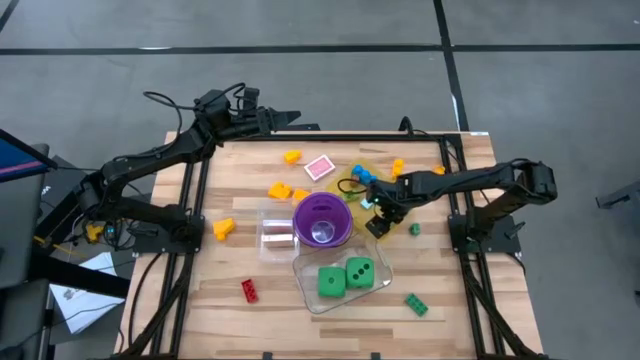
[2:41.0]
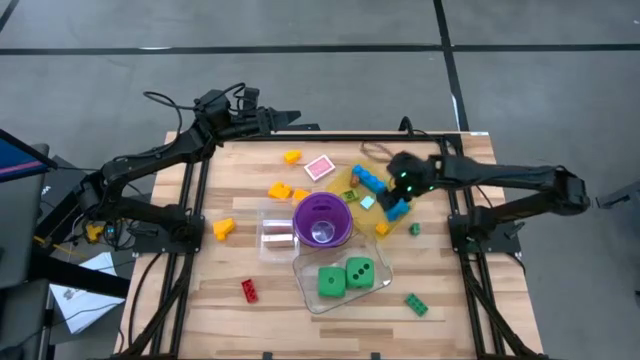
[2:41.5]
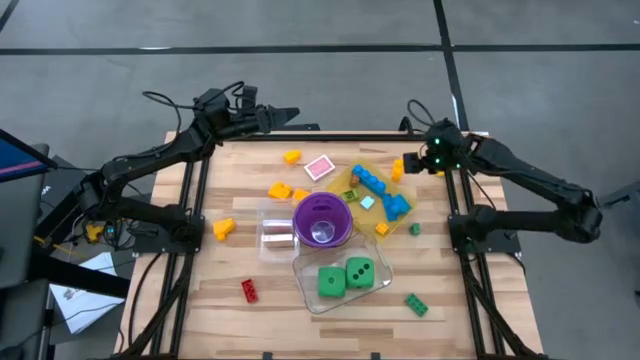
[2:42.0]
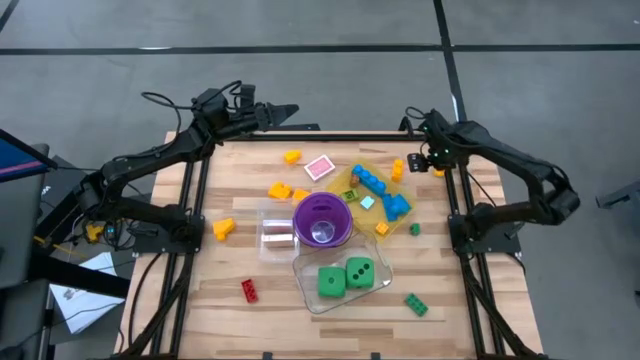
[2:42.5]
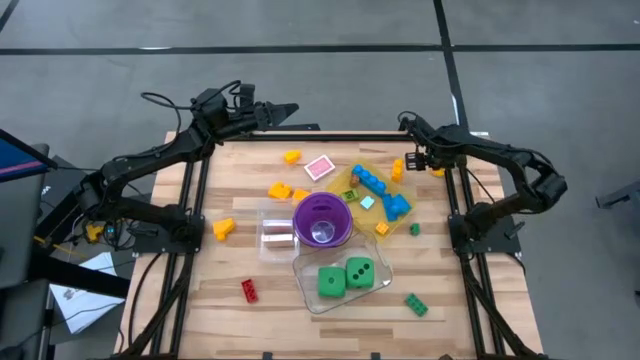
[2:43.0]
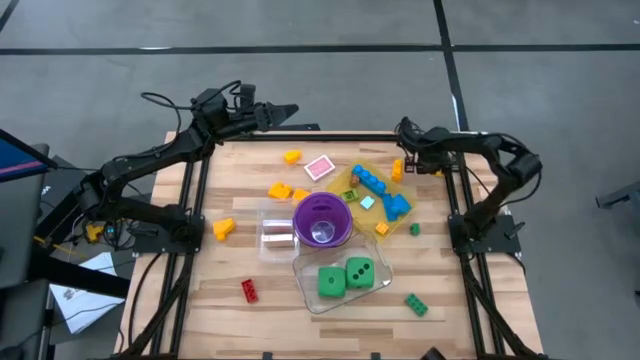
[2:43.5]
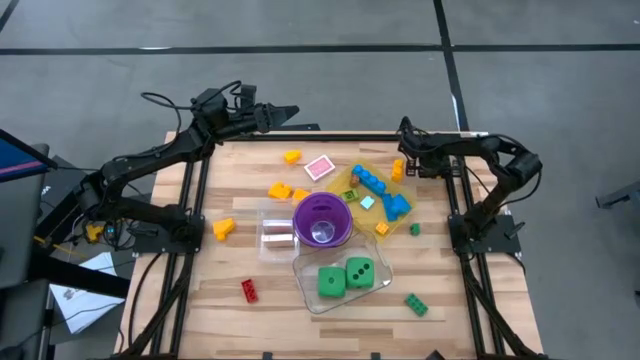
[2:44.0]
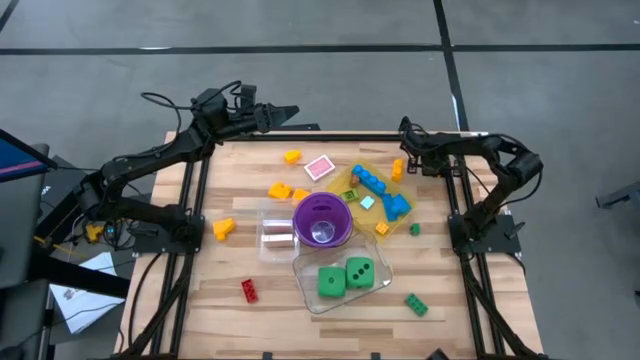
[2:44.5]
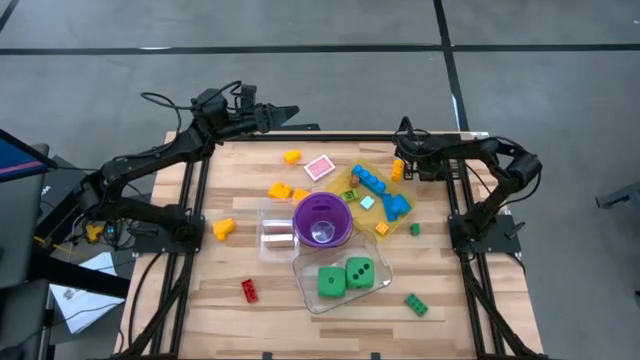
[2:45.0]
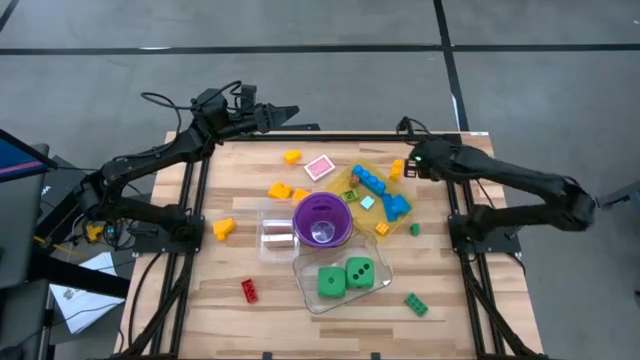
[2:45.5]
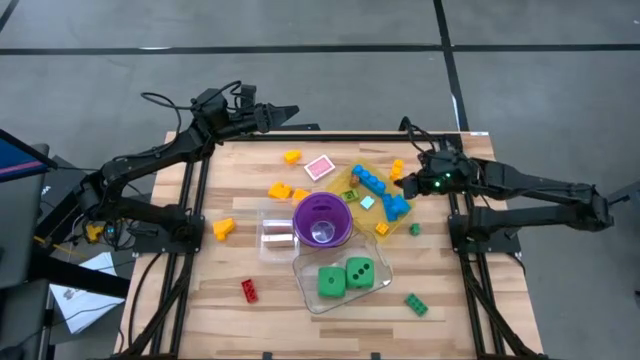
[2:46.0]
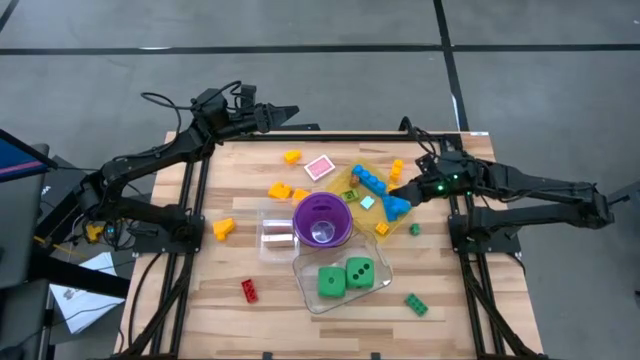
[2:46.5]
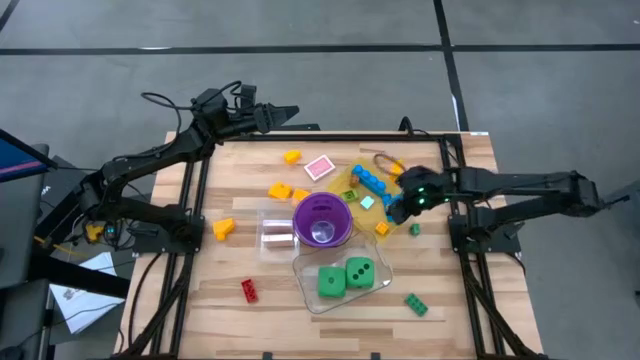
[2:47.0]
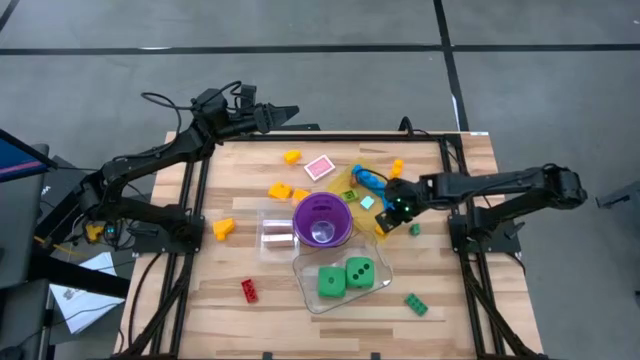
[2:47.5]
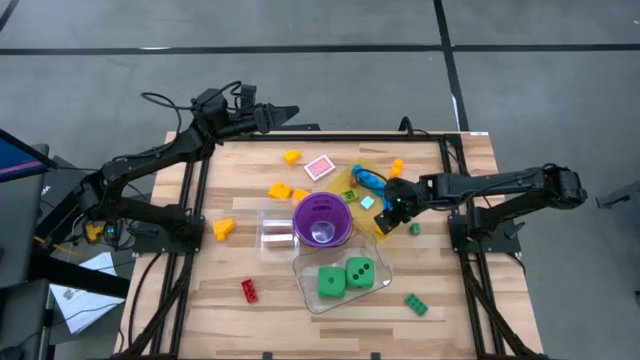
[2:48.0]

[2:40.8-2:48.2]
Task: Pick & Place Toys
Put the small yellow game piece into the yellow bin

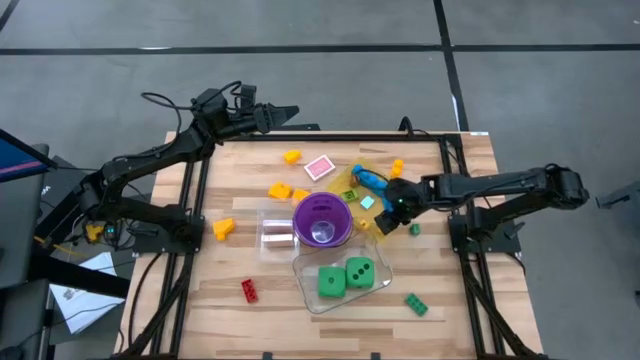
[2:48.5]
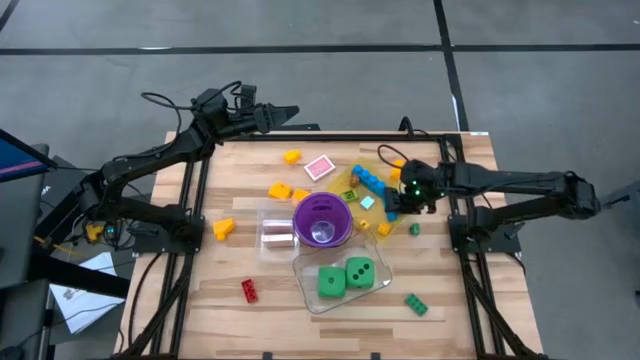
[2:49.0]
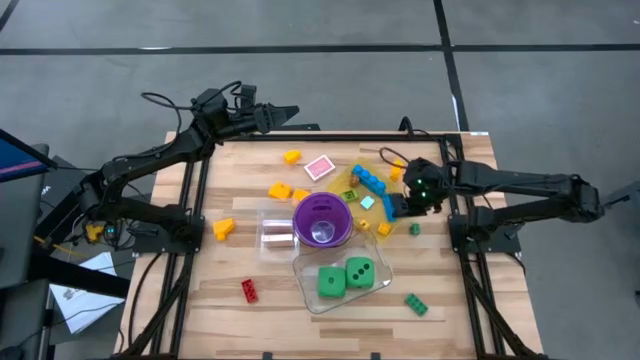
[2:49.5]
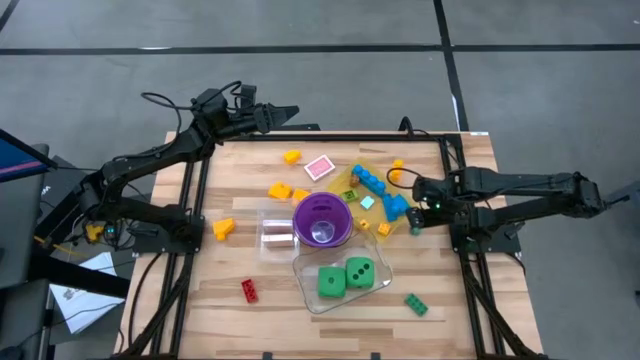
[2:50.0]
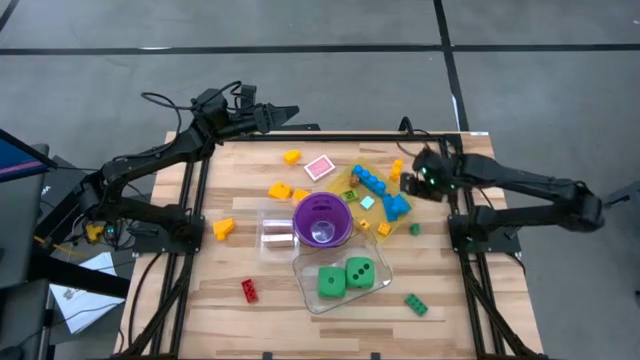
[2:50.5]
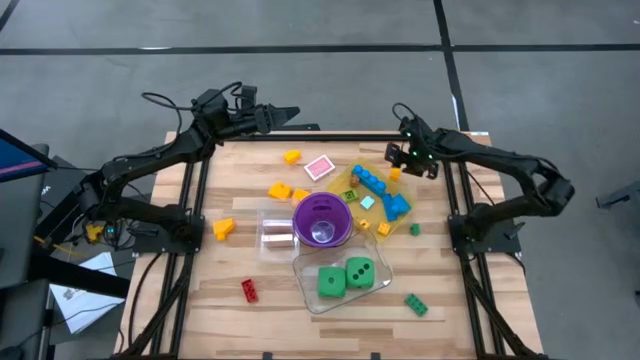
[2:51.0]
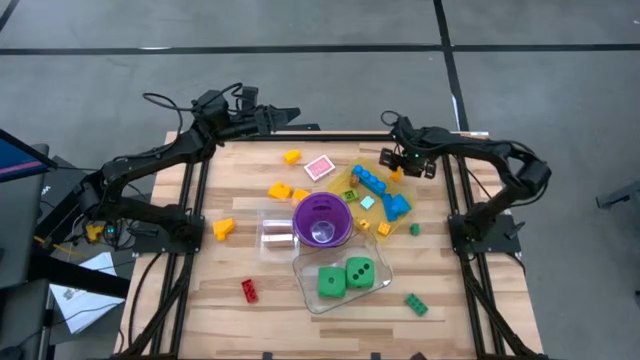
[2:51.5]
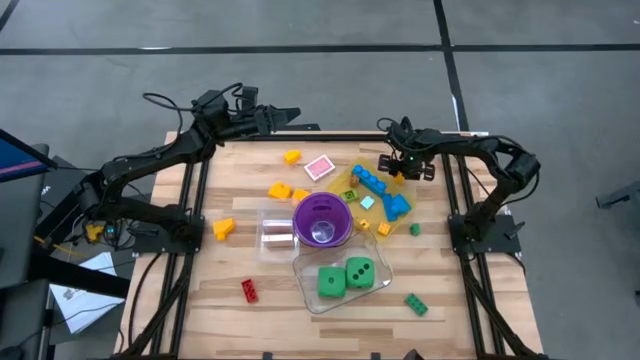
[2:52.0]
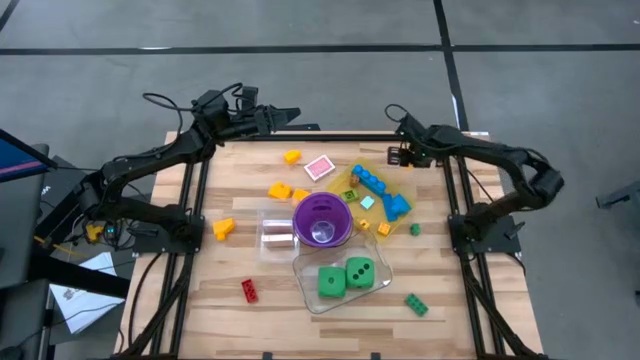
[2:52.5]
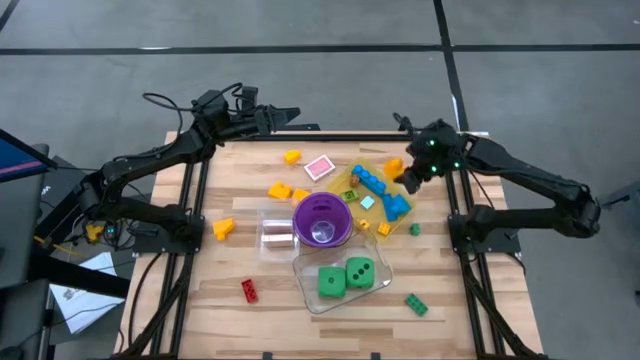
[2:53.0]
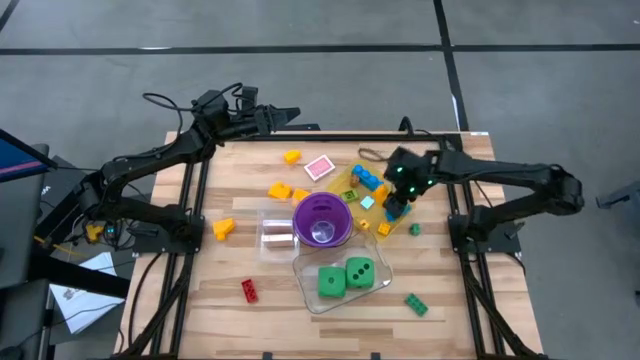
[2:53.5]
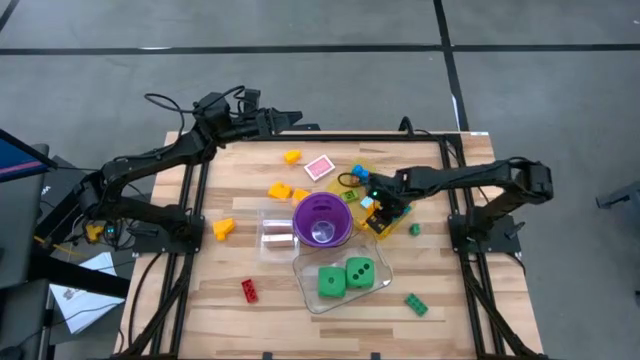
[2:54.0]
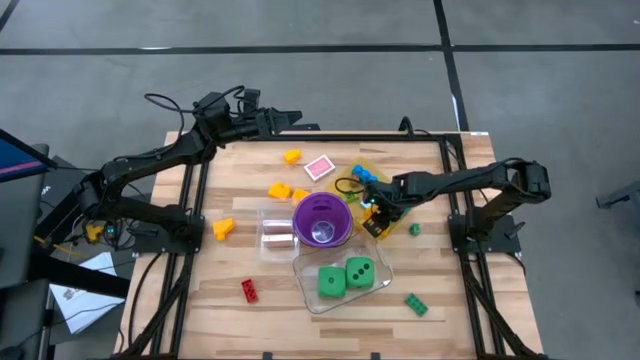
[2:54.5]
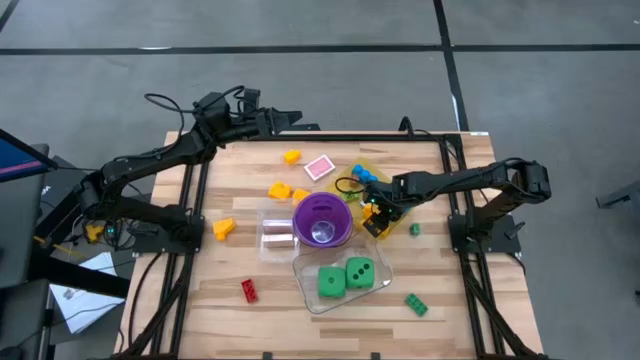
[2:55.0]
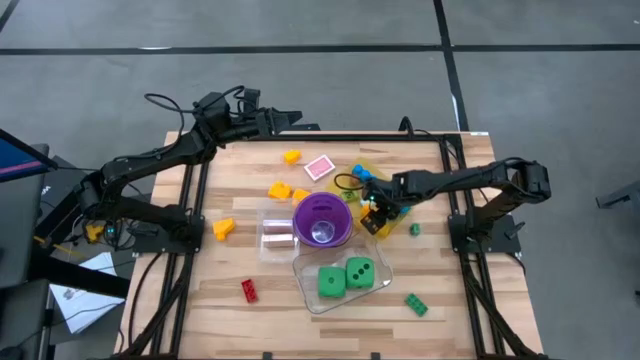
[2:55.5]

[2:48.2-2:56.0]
Put the large yellow game piece into the yellow bin

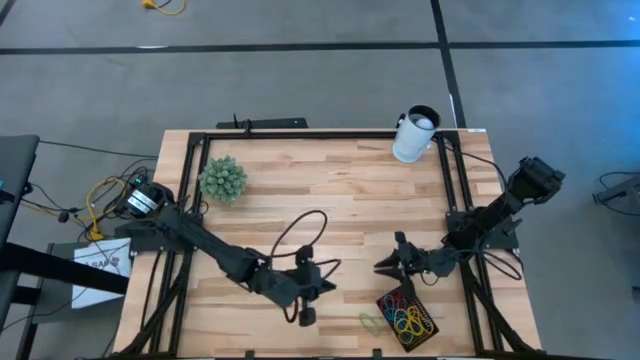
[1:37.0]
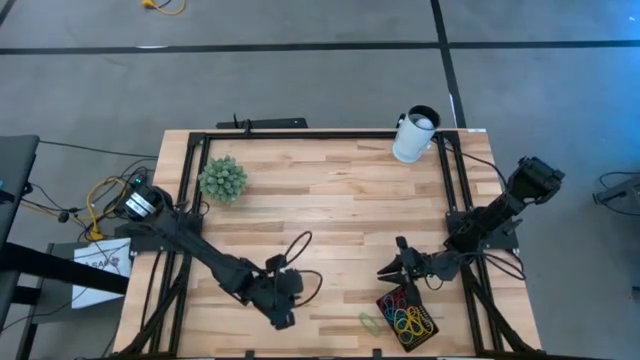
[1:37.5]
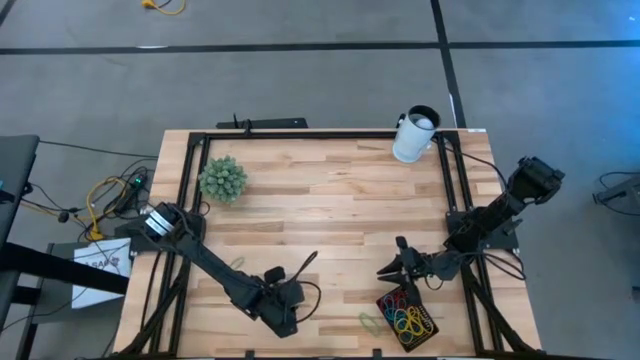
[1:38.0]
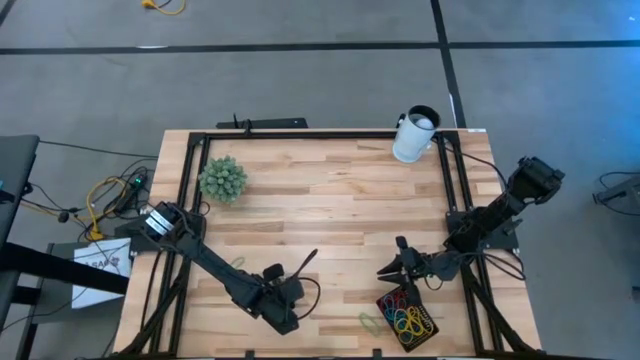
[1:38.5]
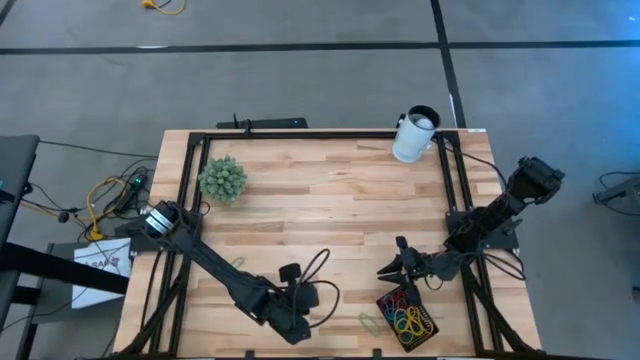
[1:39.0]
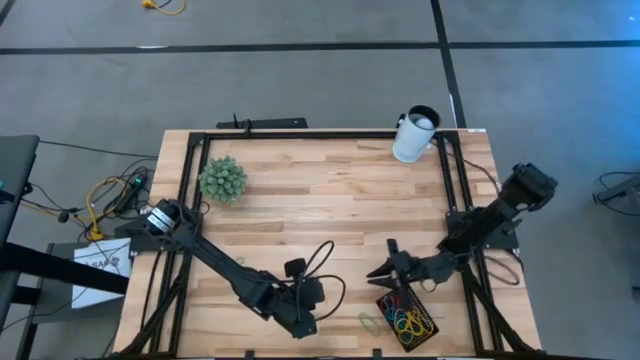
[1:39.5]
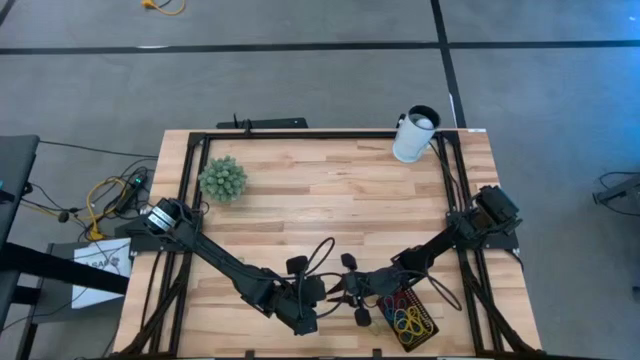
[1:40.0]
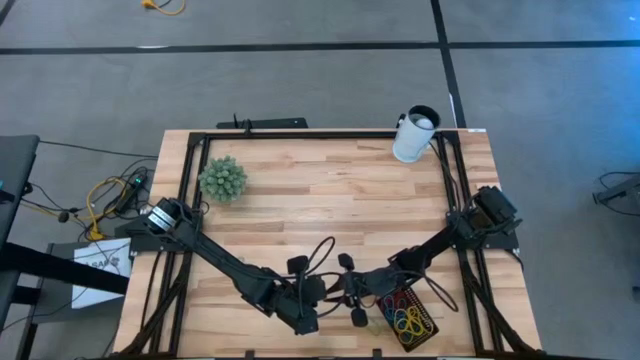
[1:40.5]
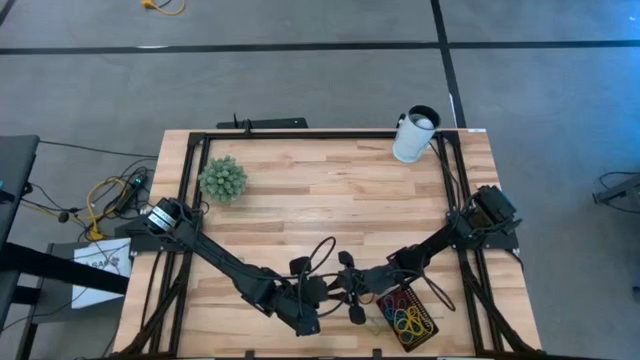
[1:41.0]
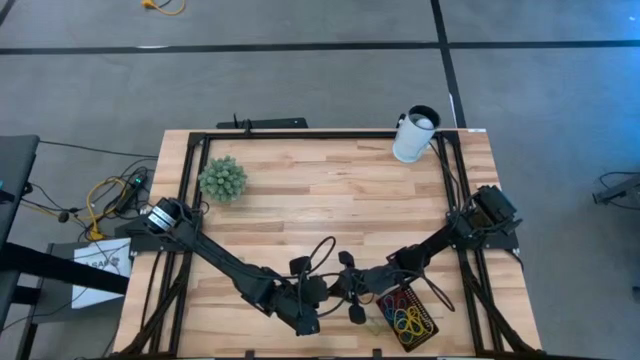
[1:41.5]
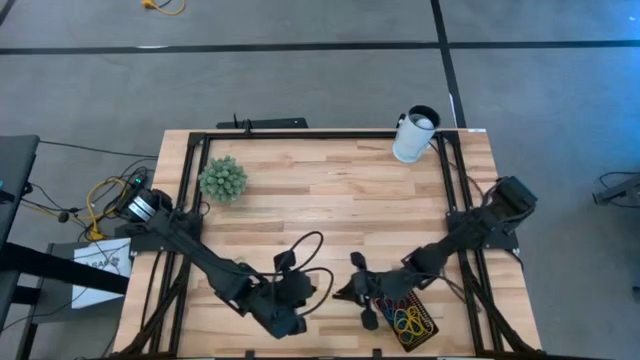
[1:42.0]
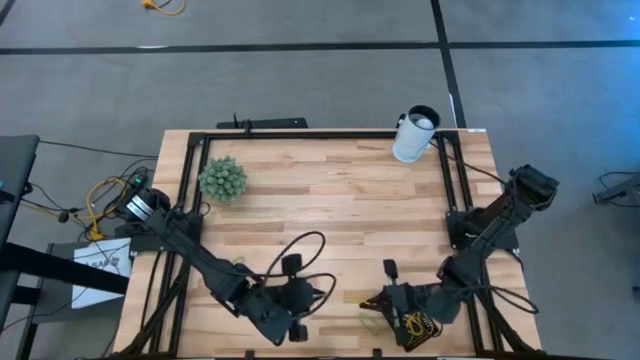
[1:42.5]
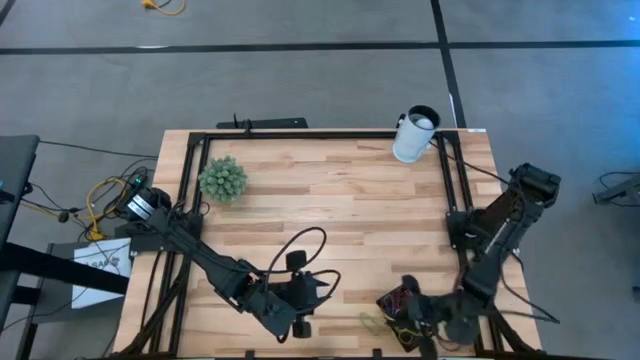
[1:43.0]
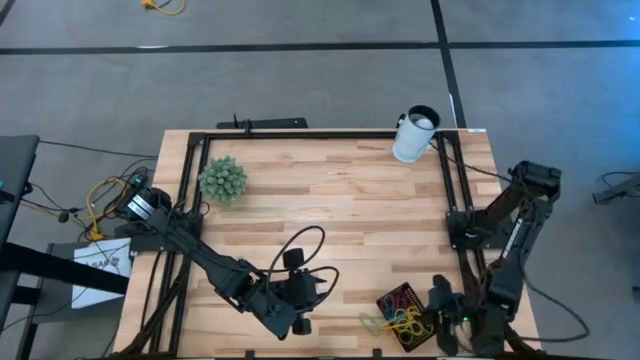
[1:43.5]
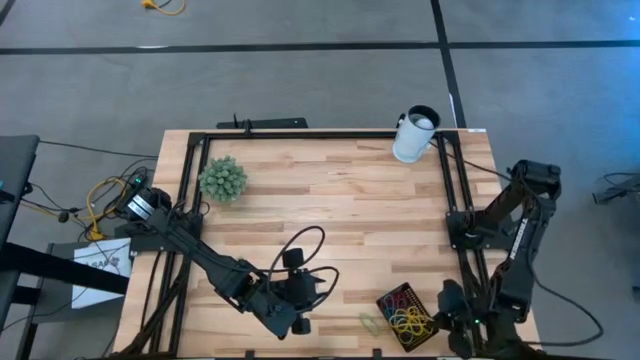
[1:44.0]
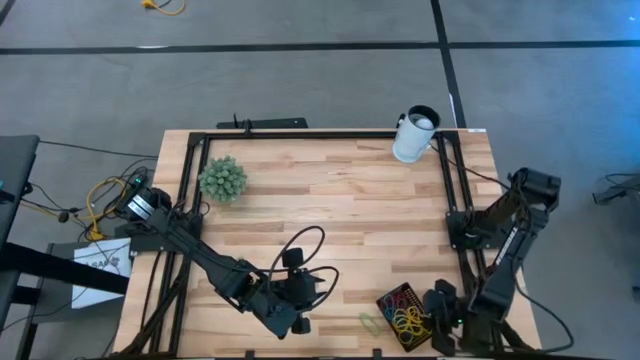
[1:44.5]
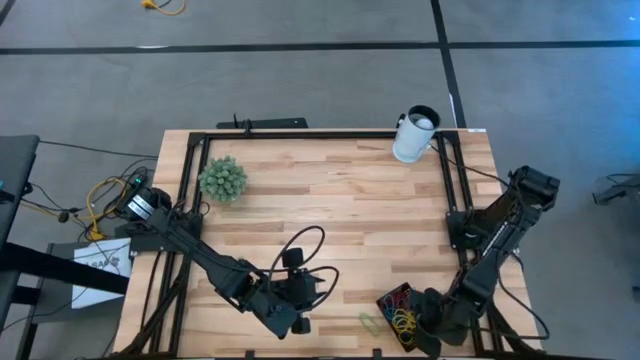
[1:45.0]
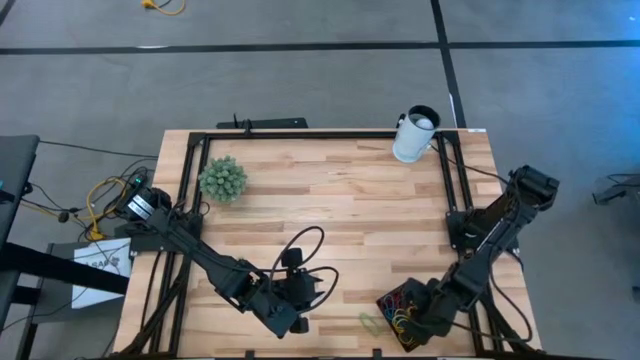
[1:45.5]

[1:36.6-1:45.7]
Task: Pick and place rubber bands into bin
Put the yellow rubber band into the black basket
